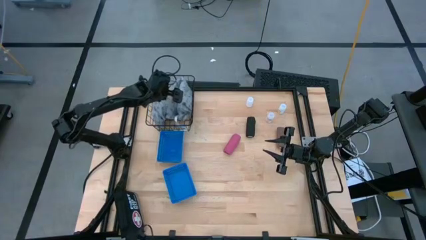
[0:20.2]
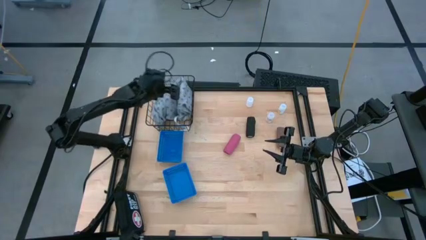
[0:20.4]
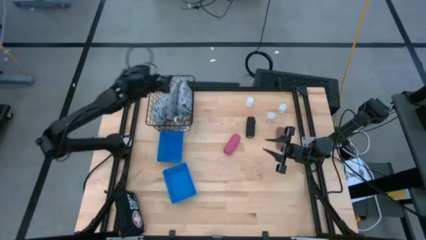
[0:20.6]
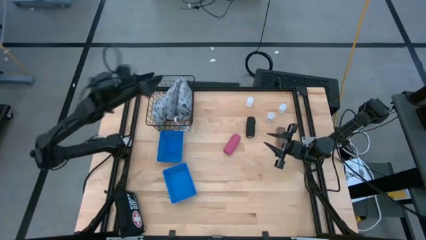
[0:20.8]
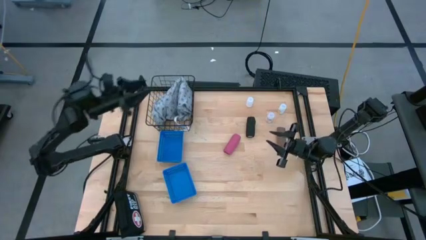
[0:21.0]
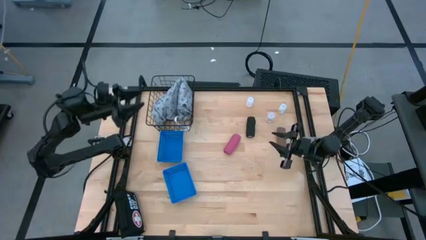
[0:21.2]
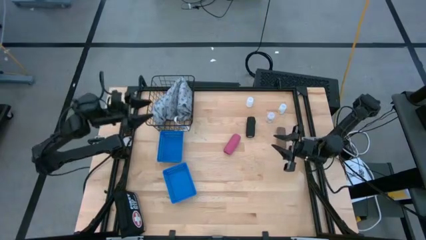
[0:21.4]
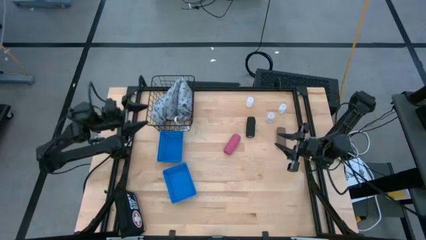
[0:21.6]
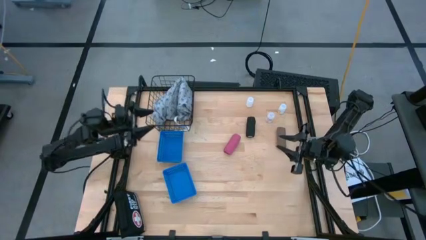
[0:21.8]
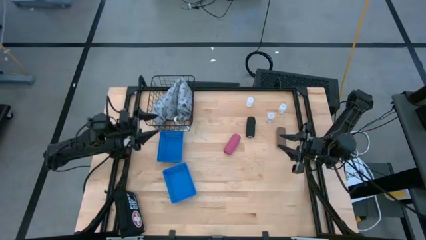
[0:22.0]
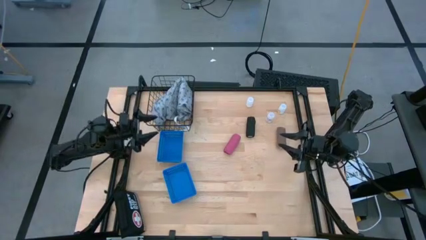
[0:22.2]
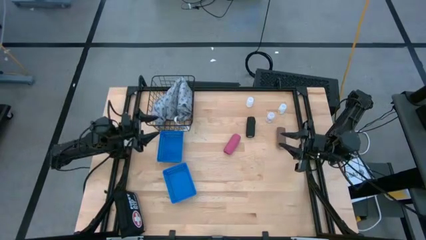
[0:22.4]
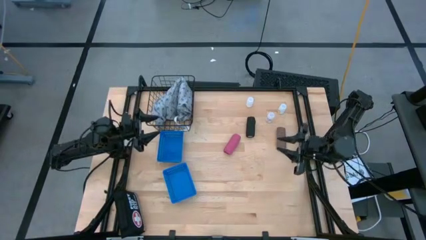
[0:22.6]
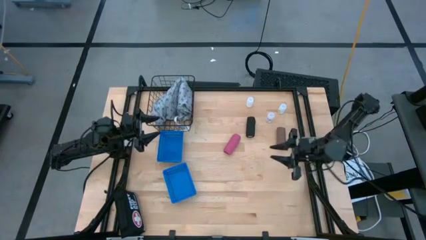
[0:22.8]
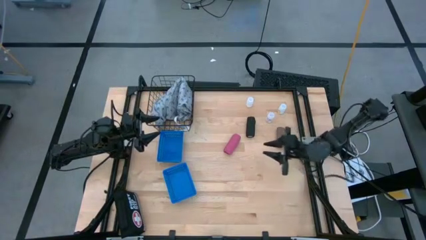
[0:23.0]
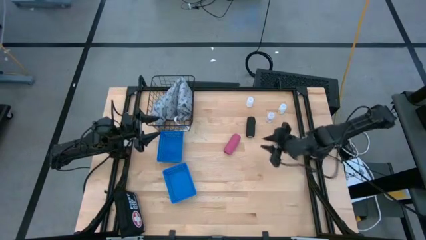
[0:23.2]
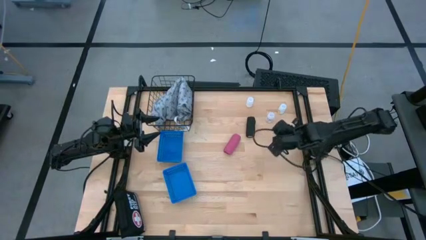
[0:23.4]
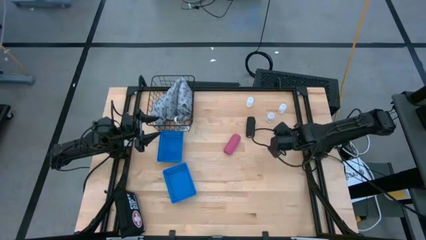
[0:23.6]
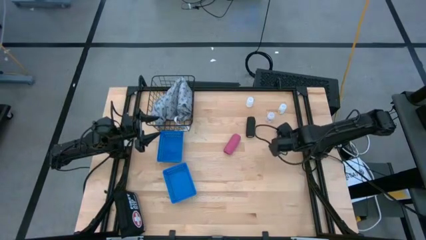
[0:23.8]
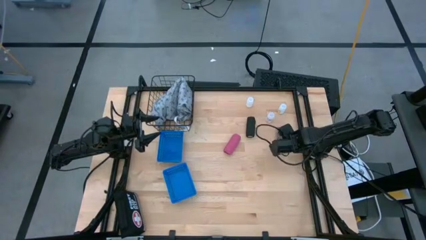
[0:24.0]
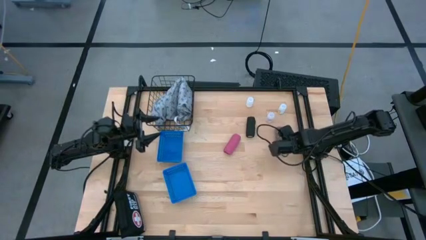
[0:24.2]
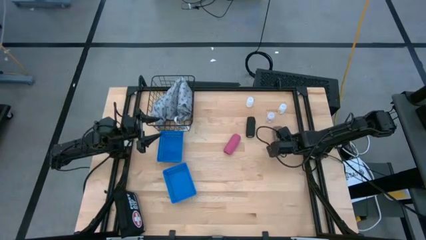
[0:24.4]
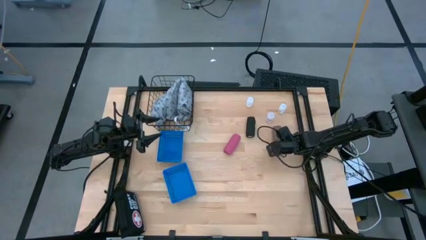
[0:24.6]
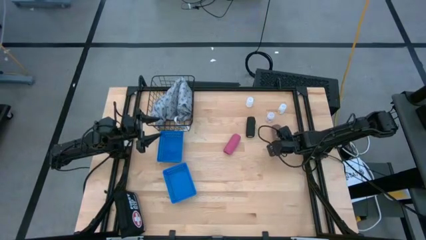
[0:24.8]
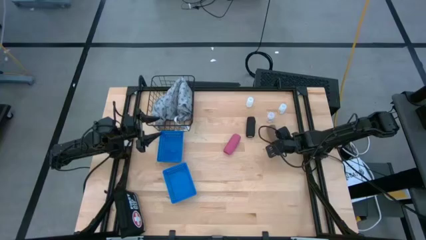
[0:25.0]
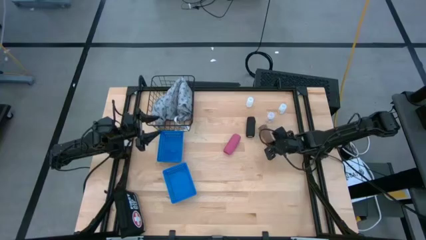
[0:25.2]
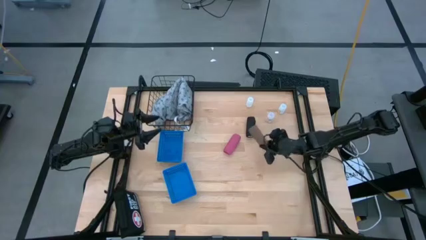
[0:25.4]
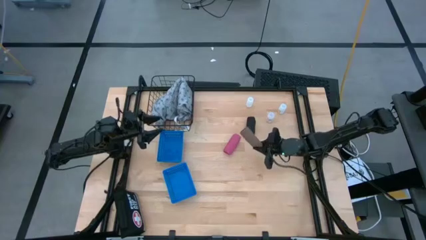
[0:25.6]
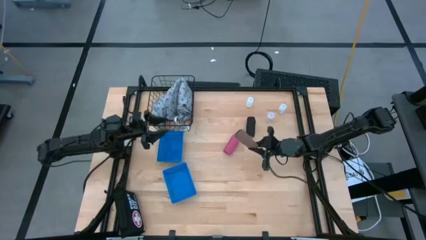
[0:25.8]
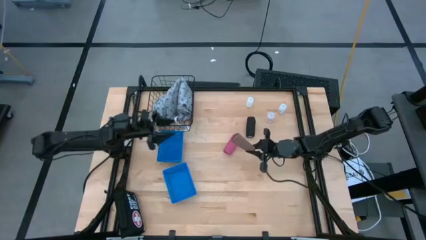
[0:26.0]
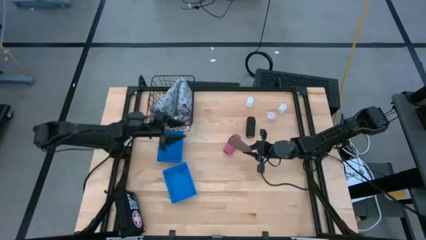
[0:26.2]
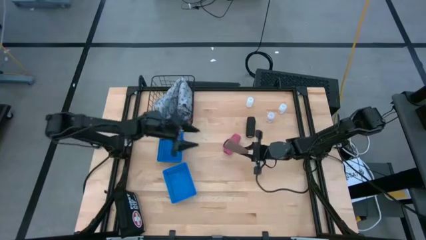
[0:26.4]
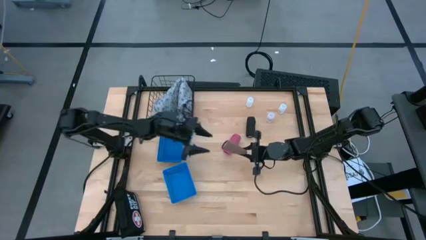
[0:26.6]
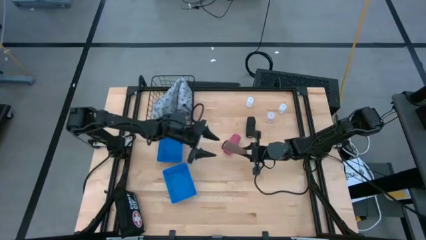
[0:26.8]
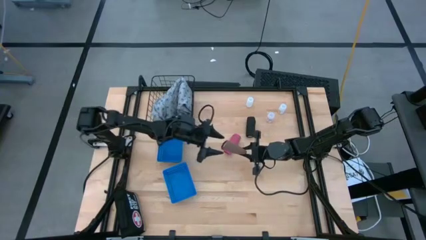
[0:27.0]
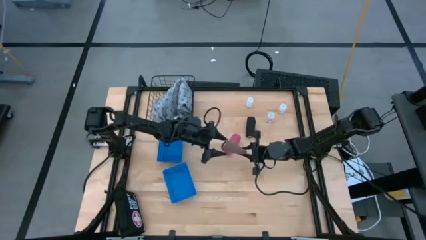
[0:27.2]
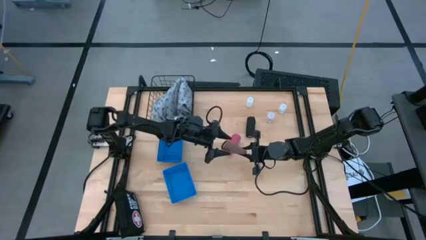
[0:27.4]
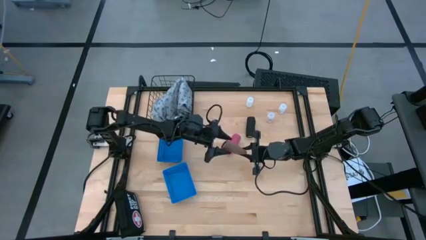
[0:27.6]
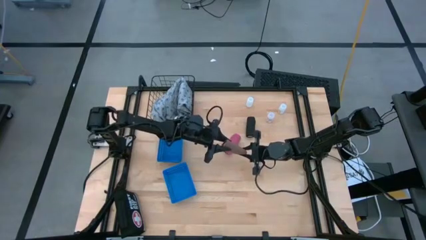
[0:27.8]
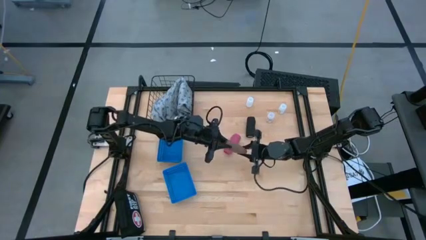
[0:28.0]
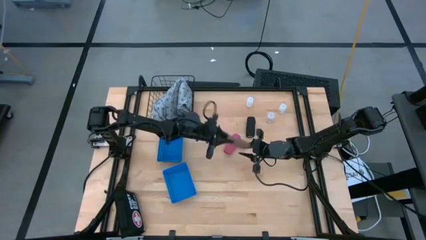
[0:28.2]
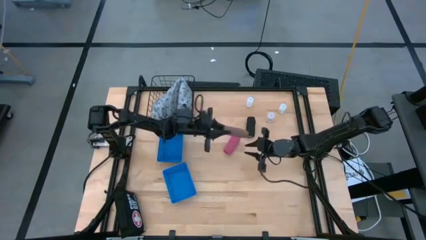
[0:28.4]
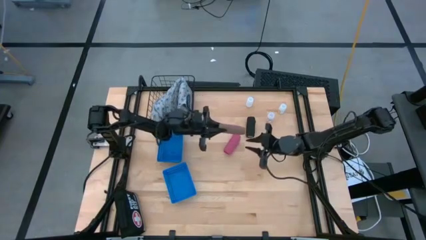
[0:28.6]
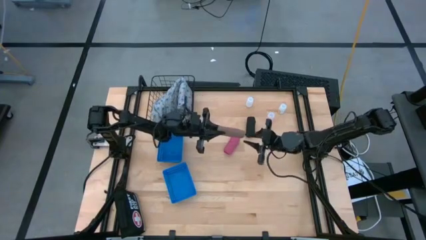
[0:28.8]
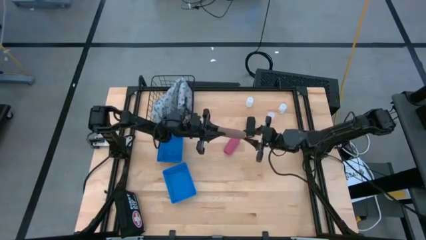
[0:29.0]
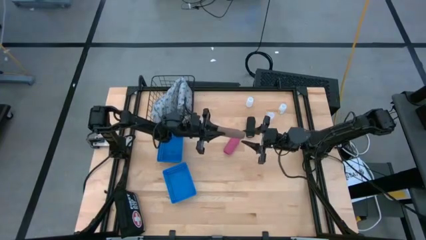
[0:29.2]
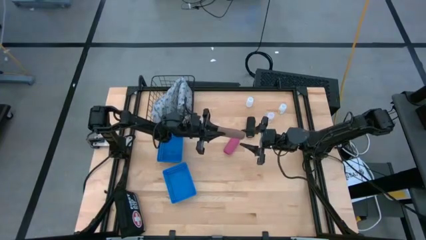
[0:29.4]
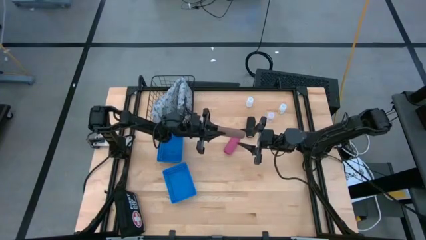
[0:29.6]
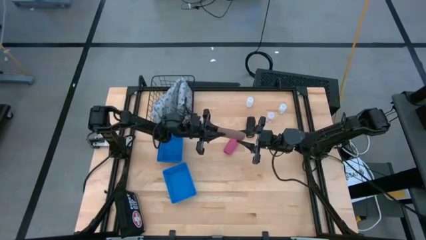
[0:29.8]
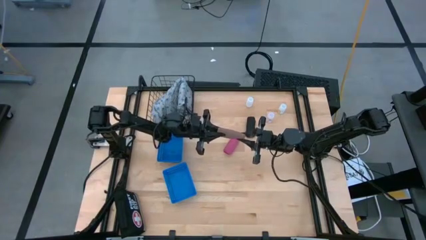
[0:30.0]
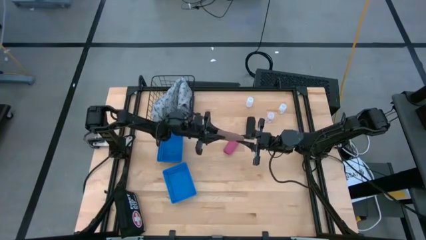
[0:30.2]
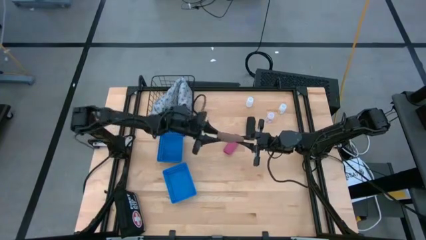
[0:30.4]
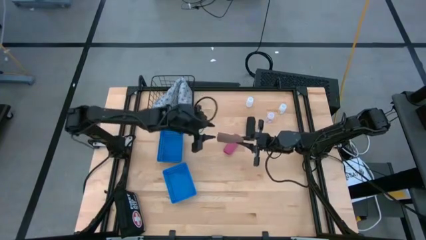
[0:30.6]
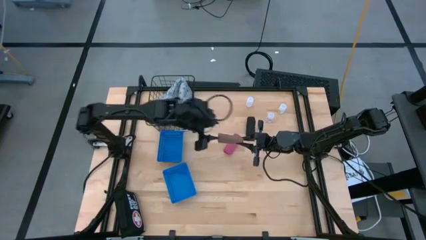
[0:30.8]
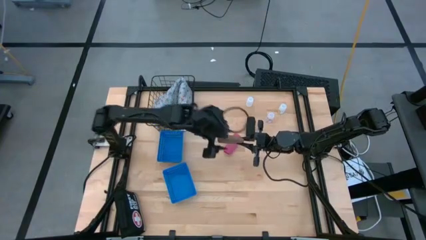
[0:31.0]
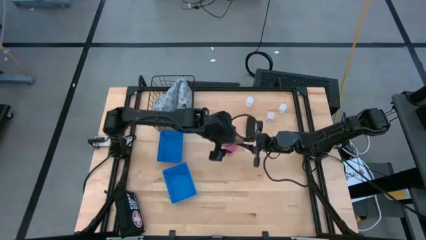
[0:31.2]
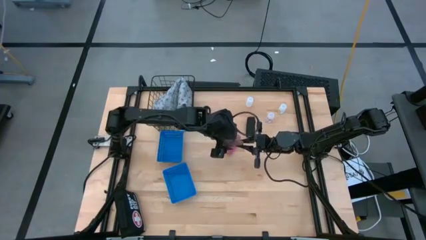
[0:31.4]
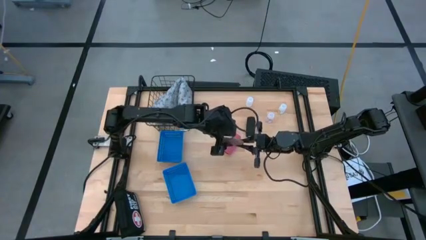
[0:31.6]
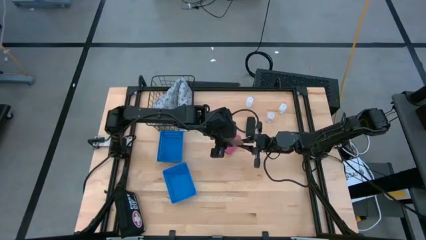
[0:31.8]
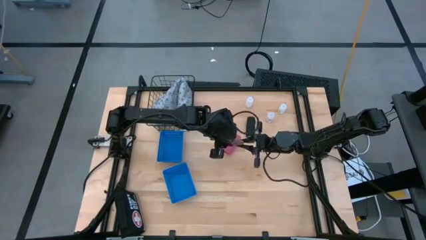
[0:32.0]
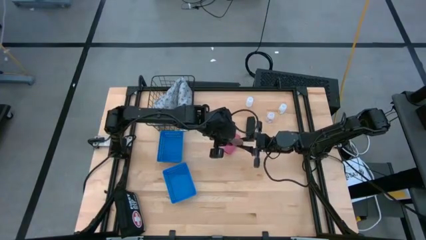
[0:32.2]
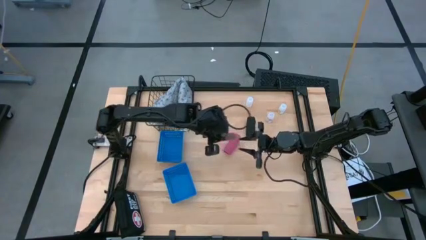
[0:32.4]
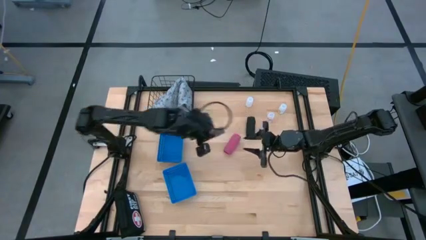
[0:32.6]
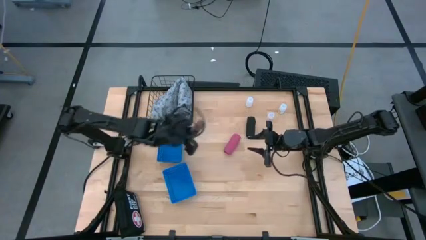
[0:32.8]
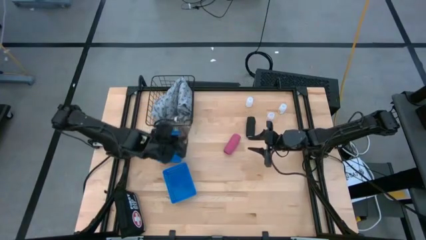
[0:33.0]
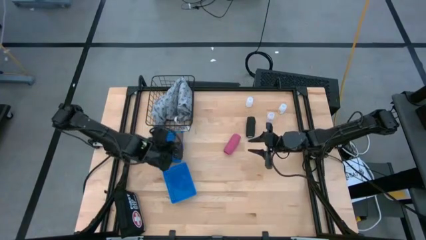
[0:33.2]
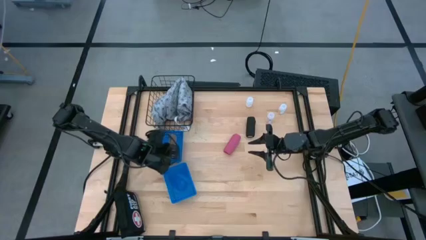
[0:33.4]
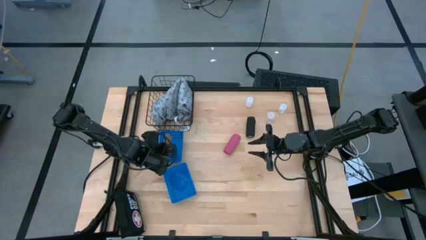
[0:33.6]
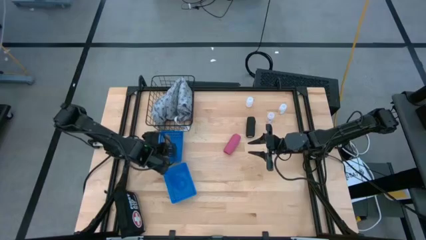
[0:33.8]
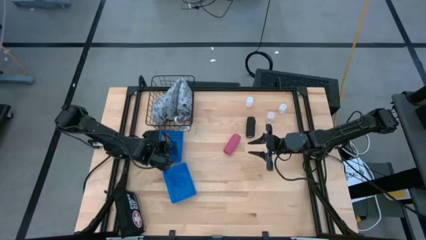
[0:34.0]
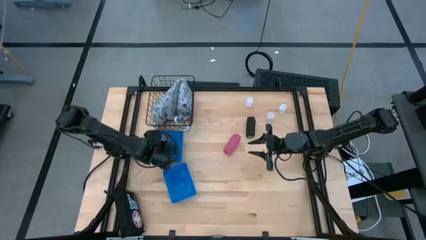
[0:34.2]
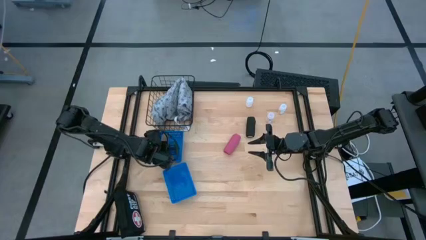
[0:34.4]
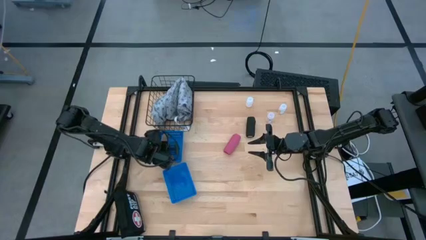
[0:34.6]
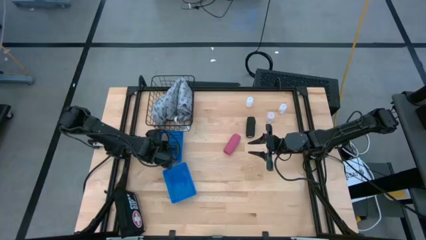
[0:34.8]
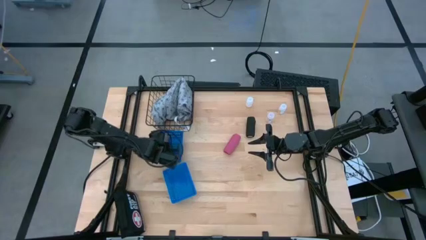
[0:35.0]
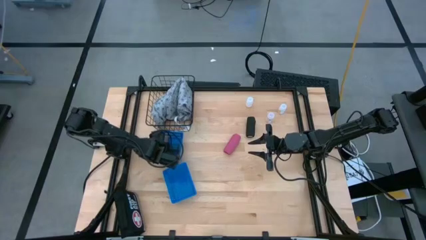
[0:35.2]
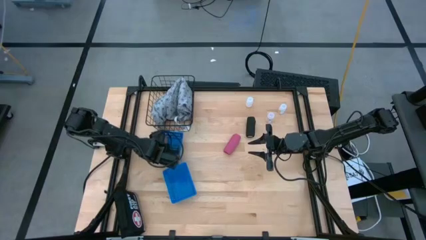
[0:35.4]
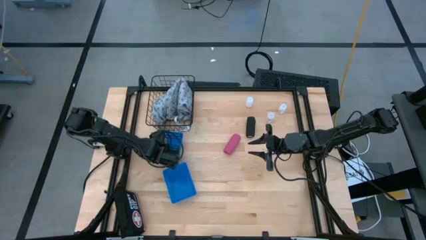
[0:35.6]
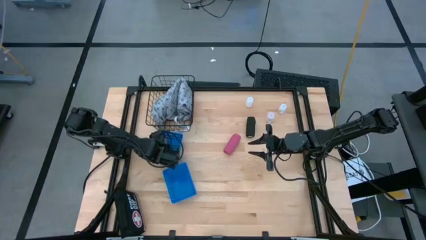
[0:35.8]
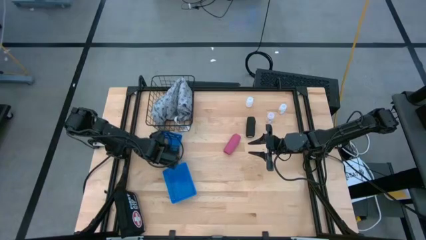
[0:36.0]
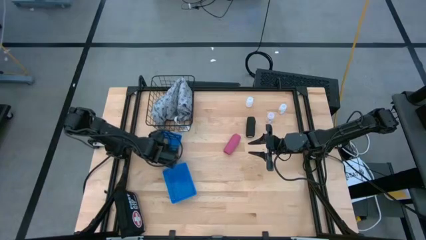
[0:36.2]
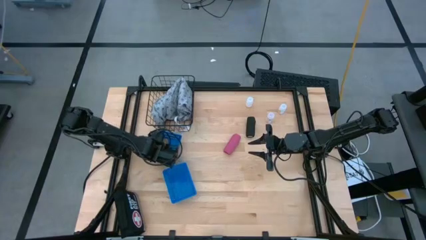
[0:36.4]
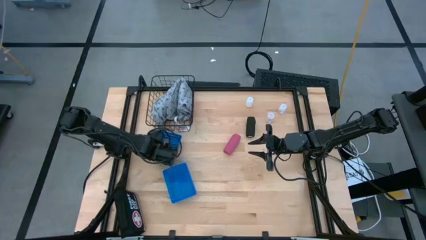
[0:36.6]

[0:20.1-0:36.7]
Task: Pick & Place Medicine items
Put the brown bandage into the top blue basket
